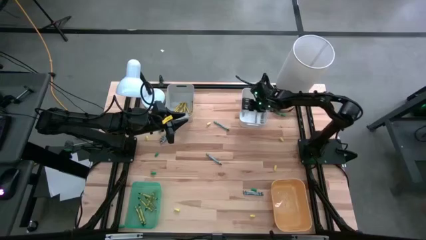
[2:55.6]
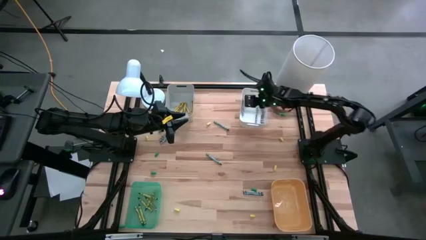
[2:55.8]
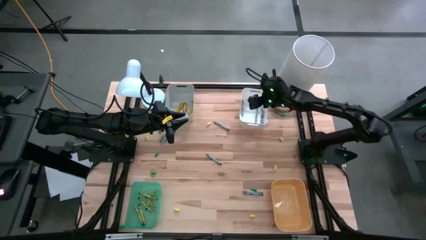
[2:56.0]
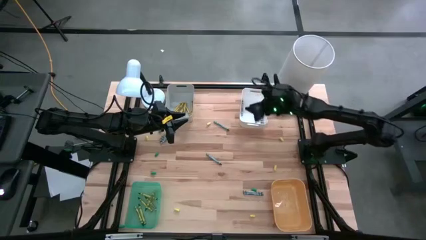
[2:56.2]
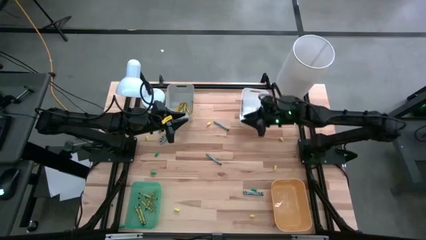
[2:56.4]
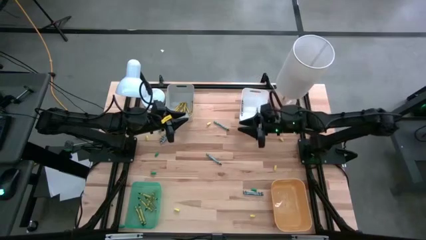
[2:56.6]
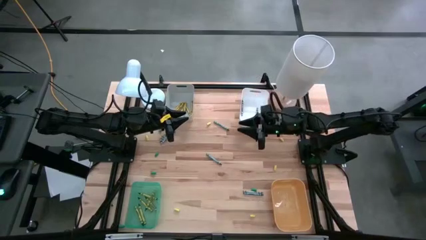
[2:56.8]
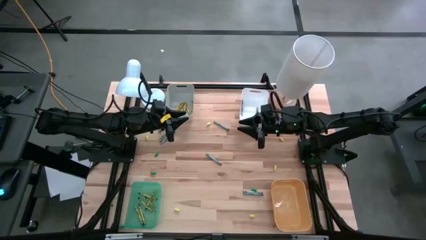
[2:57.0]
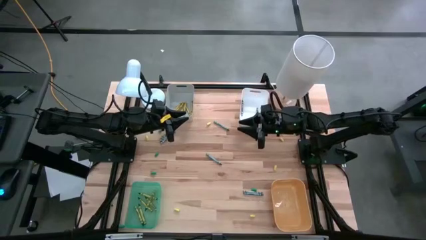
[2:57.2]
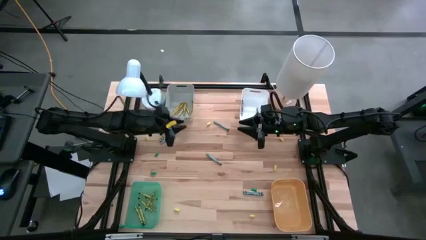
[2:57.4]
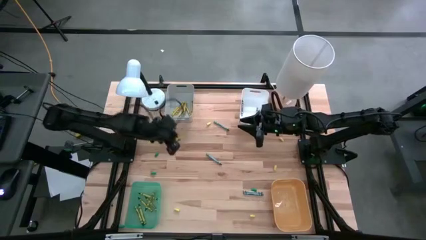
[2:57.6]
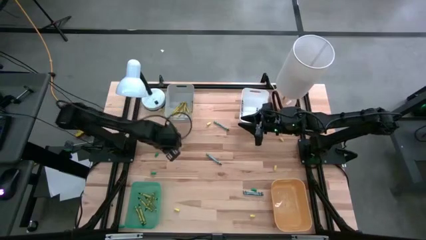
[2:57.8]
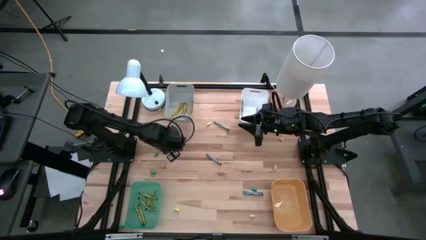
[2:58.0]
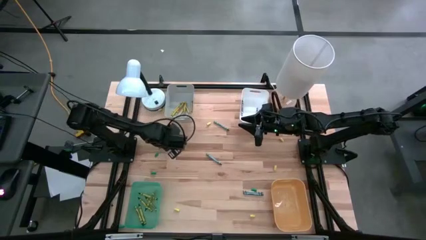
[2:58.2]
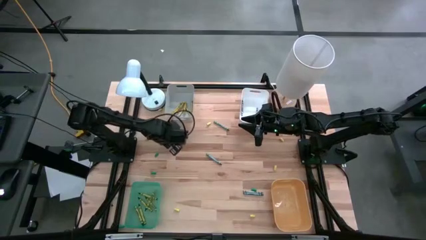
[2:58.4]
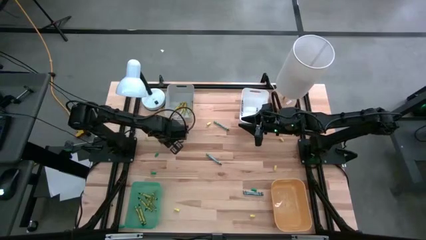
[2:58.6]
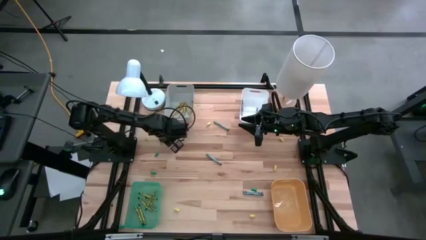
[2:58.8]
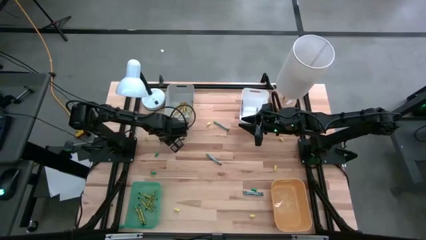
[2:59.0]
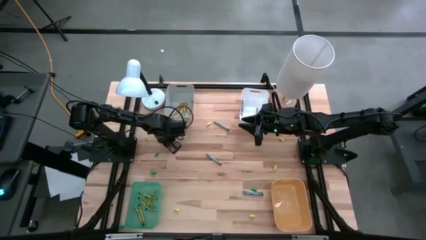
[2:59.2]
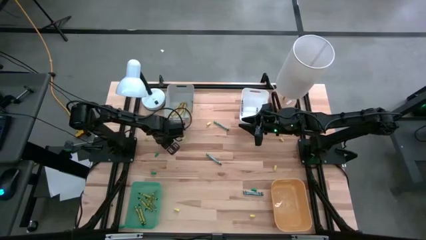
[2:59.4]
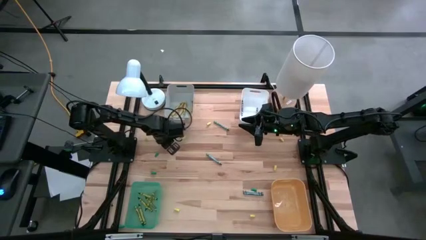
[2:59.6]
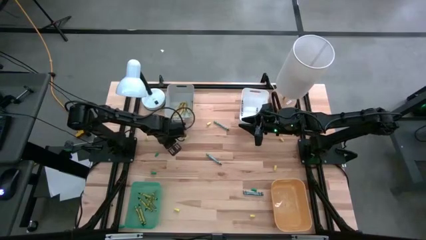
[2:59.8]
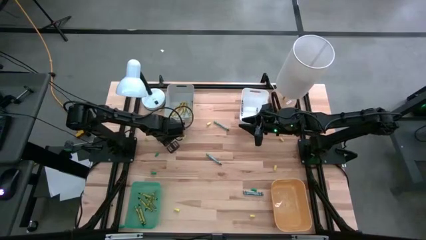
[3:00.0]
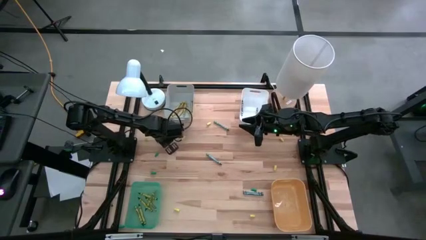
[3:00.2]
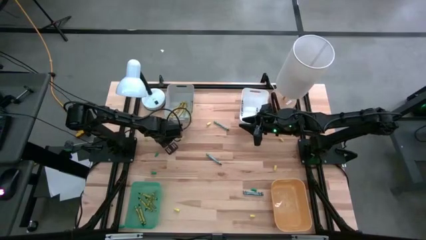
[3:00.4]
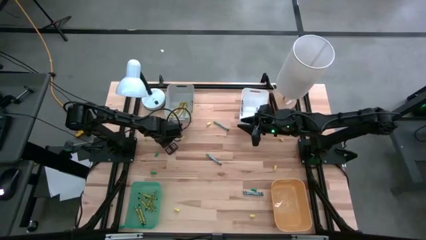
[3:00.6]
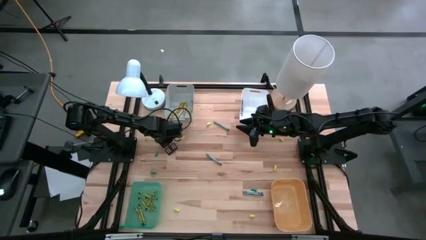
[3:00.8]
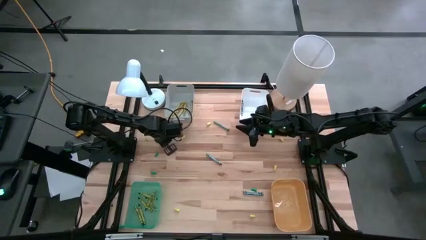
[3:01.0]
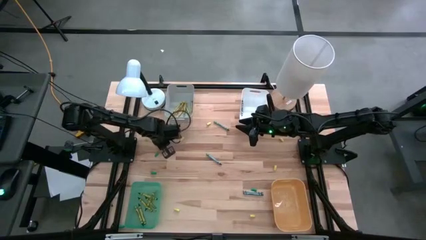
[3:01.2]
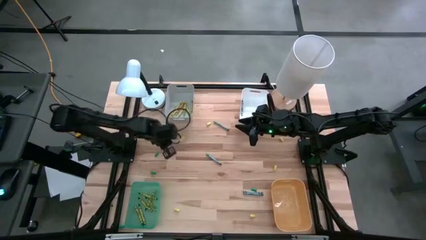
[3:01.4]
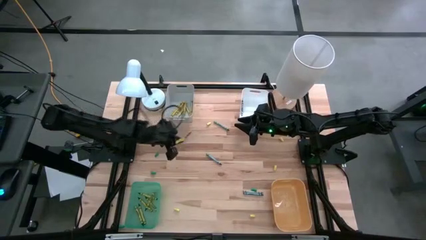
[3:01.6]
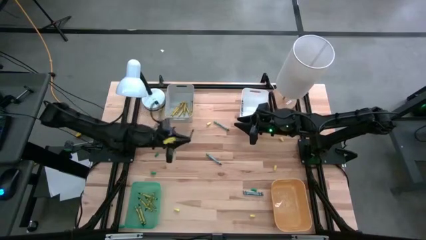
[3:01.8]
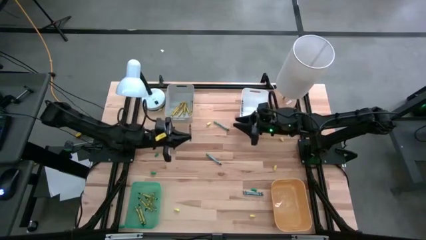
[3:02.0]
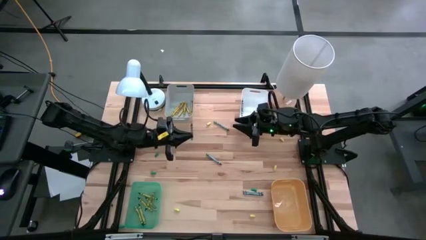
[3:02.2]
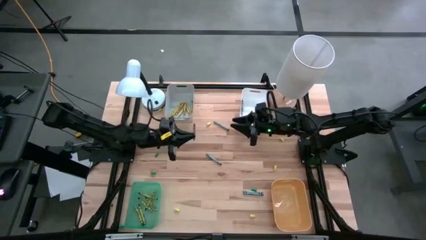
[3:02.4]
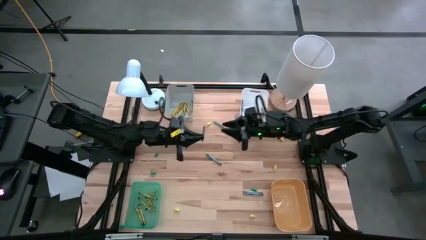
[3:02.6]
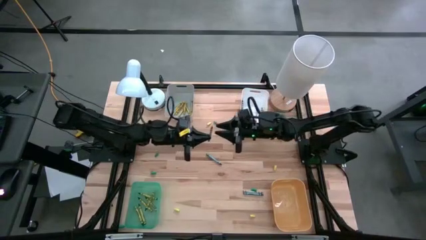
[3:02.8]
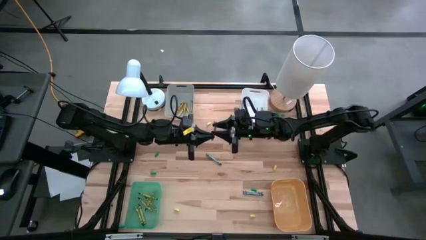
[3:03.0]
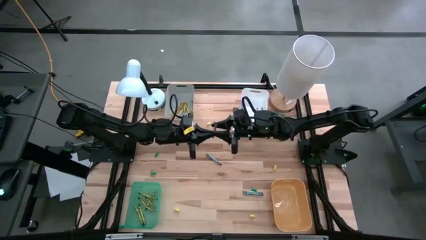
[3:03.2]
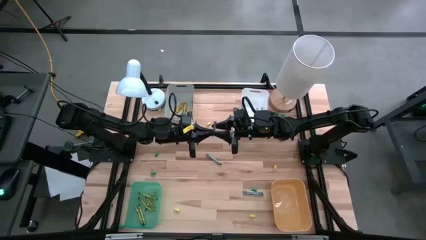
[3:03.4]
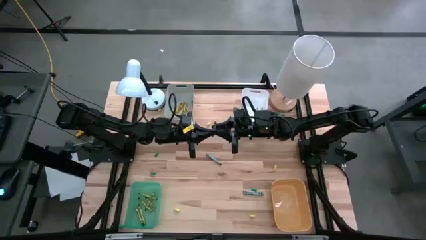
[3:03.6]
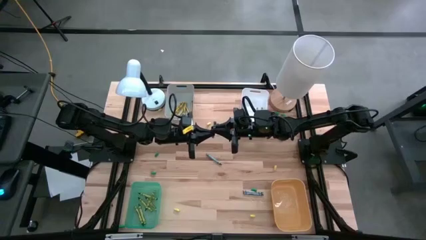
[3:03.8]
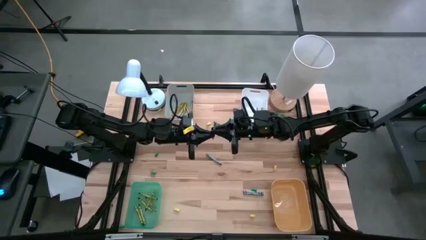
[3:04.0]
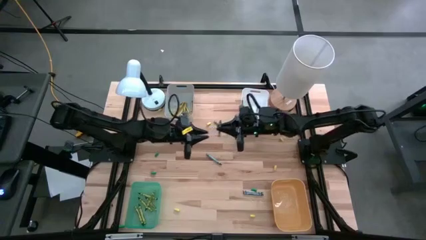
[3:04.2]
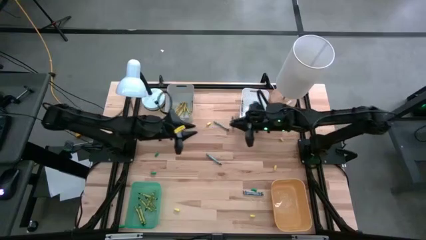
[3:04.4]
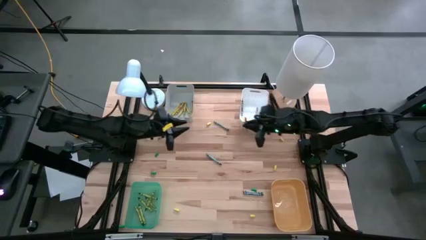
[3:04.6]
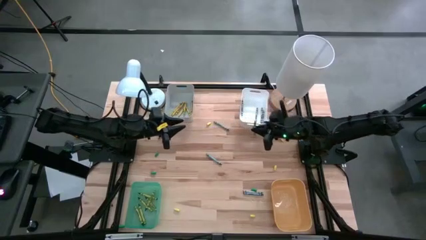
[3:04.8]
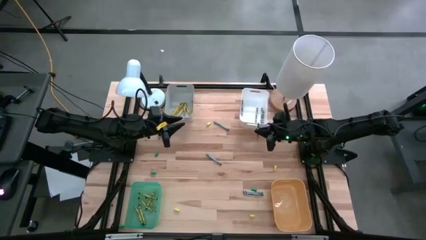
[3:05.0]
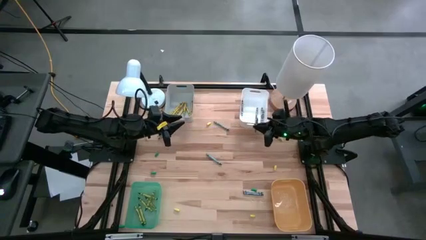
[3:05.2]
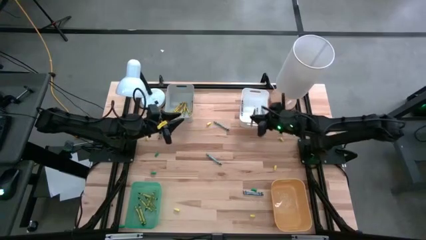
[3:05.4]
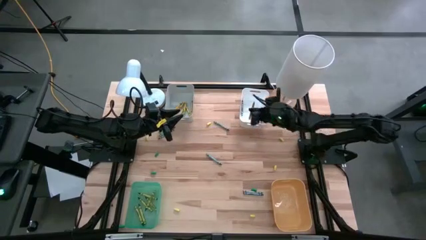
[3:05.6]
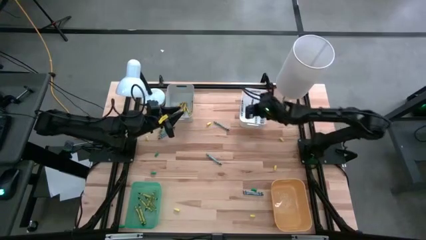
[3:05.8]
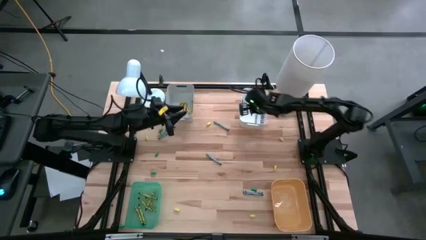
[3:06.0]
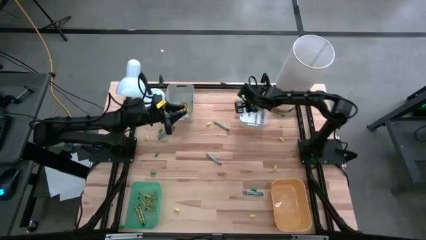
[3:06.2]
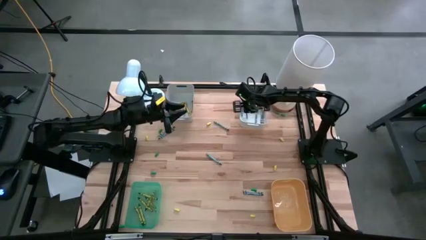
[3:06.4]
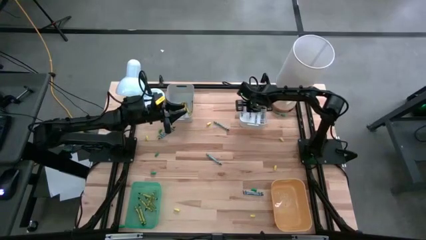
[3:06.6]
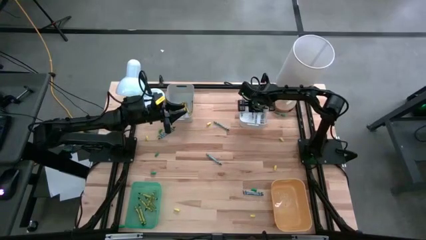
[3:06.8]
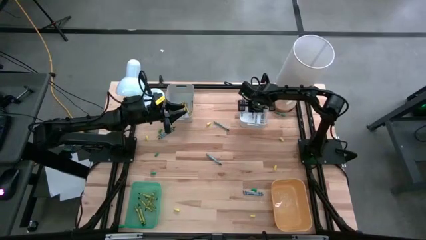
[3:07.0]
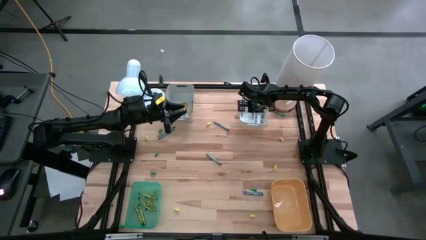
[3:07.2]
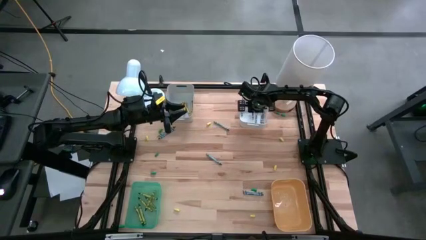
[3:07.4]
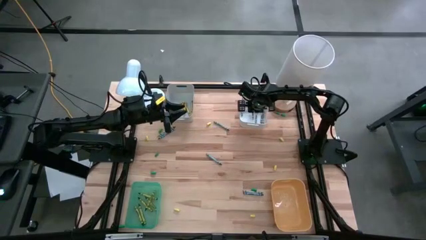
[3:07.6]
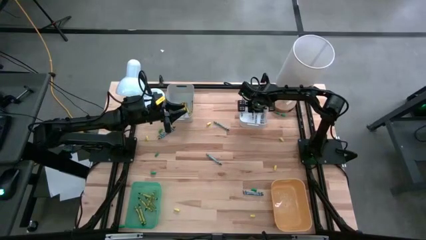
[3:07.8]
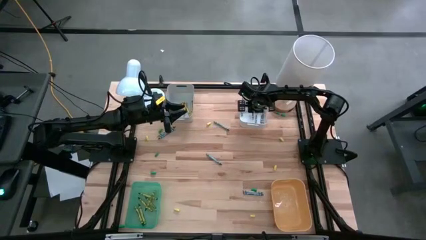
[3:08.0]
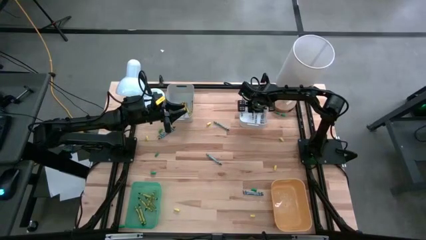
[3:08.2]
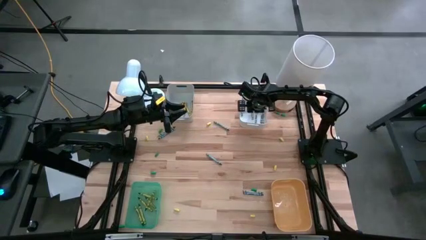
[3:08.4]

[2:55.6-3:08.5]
Task: Sort crayons
Put the gray crayon into the white bin
